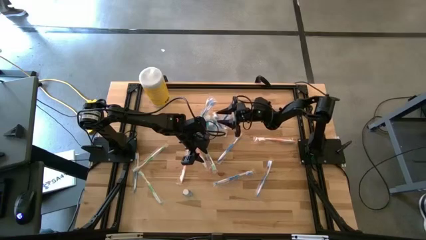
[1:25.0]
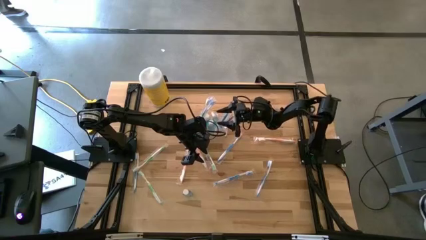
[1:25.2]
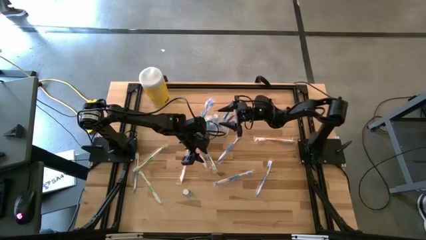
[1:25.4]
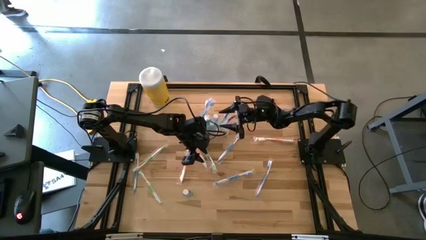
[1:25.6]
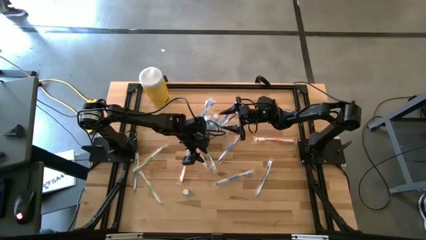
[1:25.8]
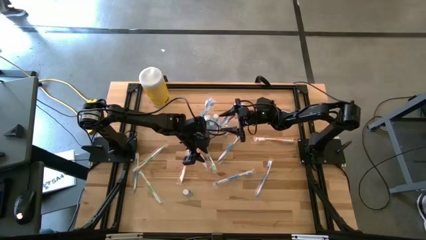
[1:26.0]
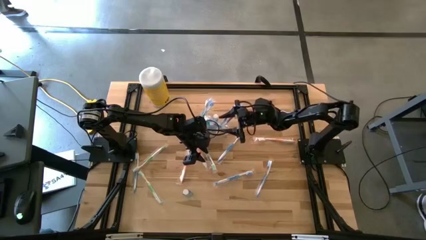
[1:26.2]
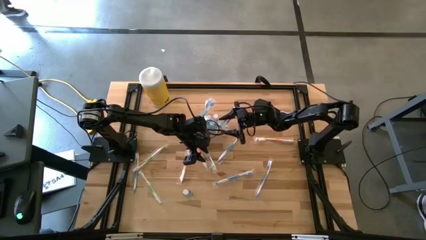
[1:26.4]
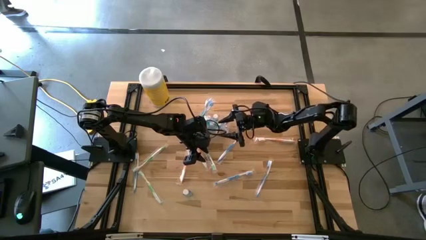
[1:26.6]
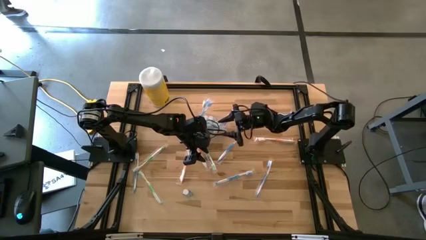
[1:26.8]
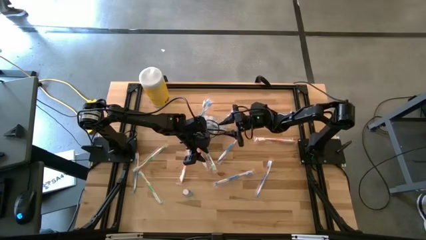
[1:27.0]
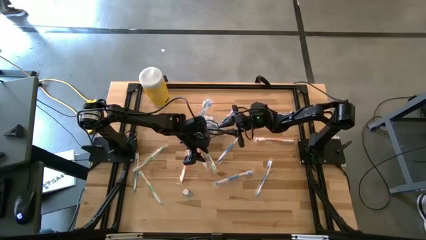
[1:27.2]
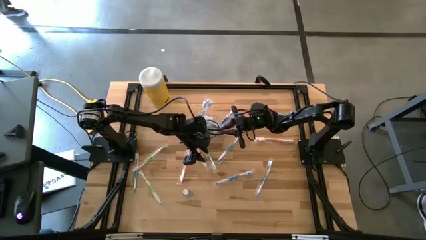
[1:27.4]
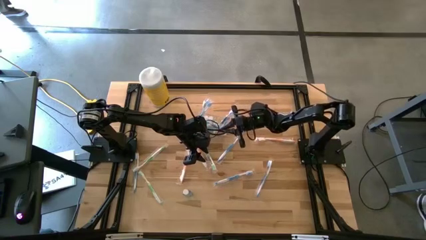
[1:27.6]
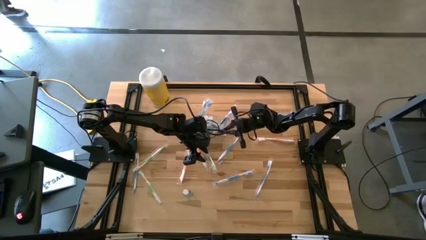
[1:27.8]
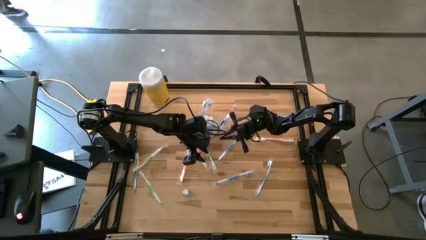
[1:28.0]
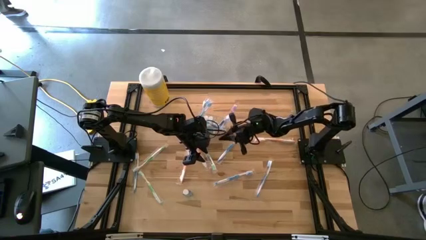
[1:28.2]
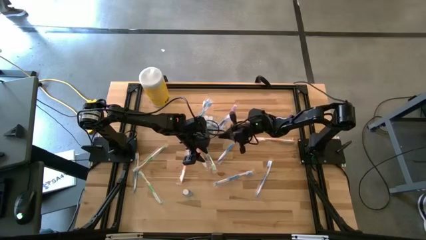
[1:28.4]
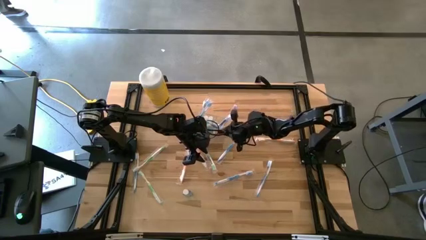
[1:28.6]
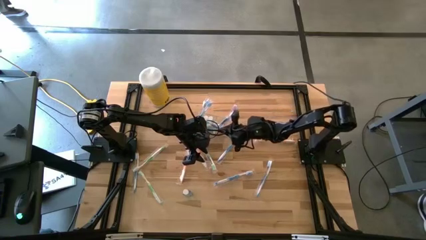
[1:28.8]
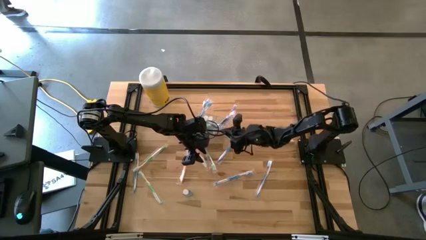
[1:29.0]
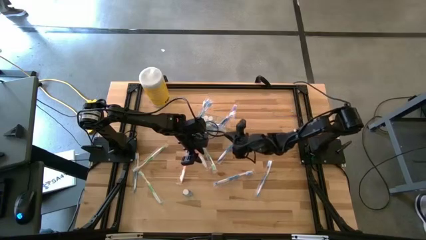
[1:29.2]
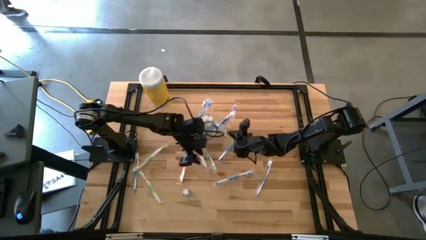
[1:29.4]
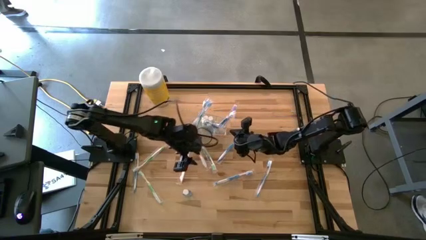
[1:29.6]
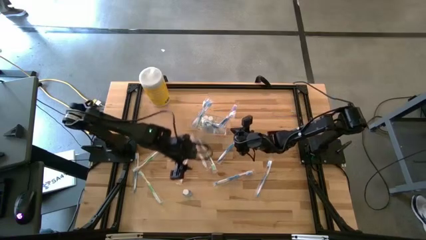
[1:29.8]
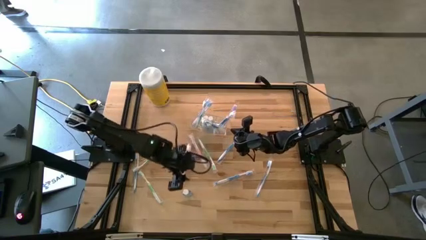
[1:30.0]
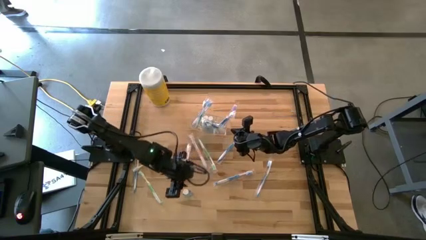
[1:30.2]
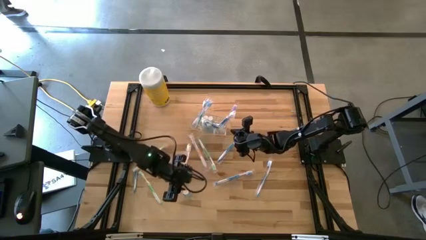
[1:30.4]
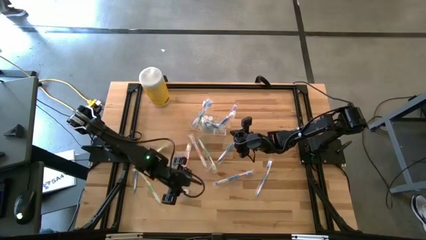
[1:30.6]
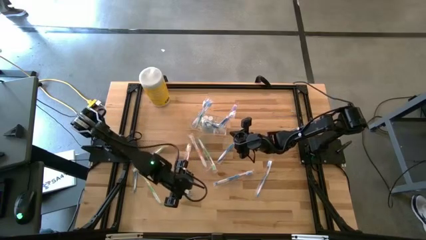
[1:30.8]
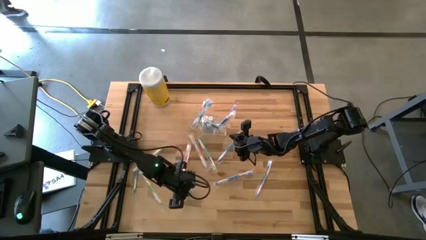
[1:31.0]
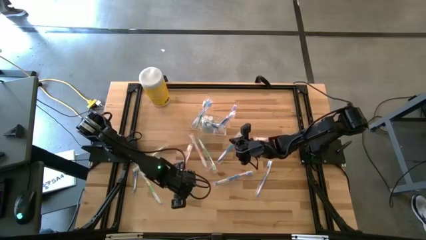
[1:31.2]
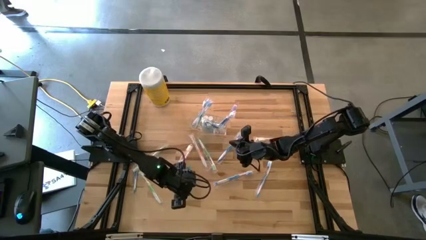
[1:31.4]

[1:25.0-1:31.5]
Task: Pick & Place toothbrushing station
Put the blue mouthwash into the transparent organizer

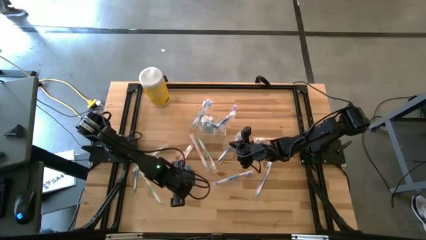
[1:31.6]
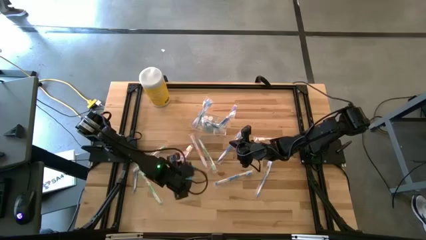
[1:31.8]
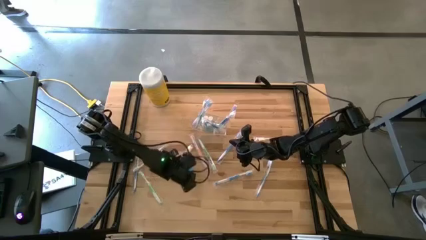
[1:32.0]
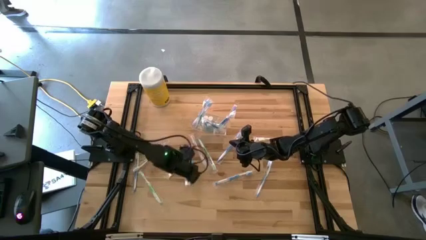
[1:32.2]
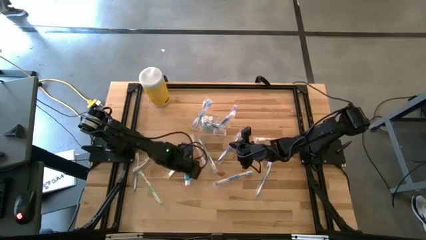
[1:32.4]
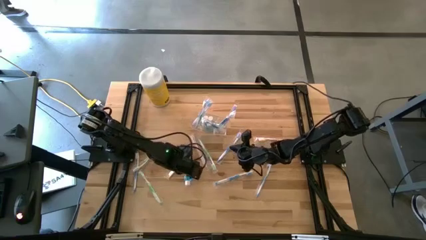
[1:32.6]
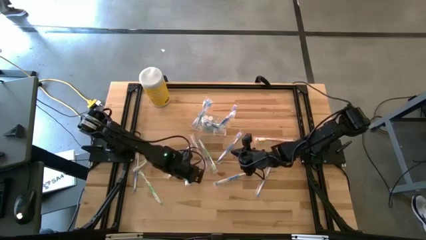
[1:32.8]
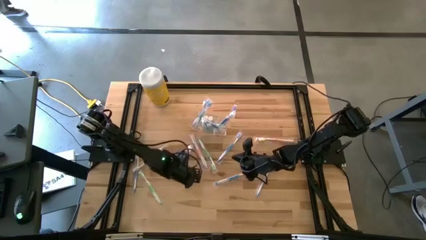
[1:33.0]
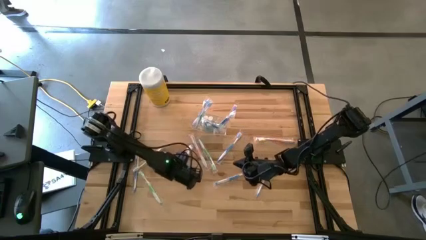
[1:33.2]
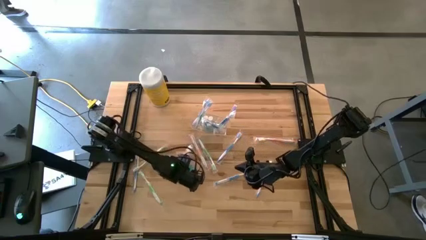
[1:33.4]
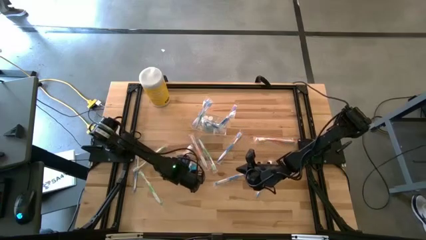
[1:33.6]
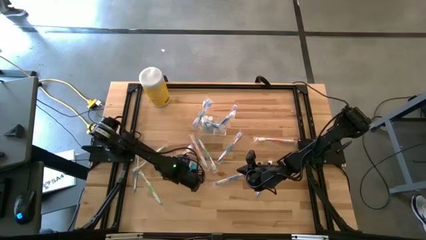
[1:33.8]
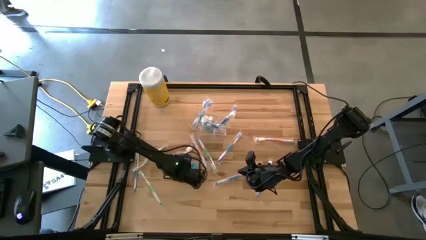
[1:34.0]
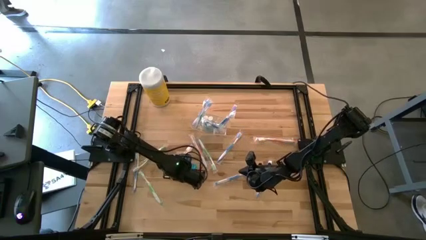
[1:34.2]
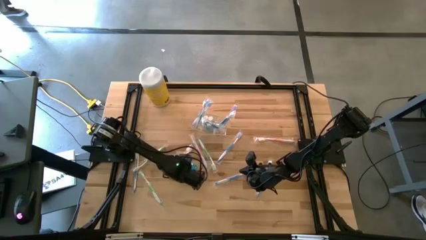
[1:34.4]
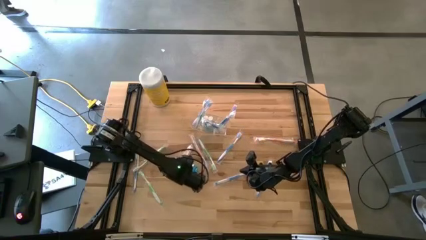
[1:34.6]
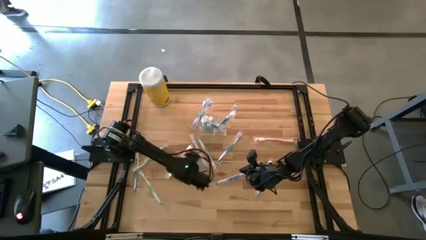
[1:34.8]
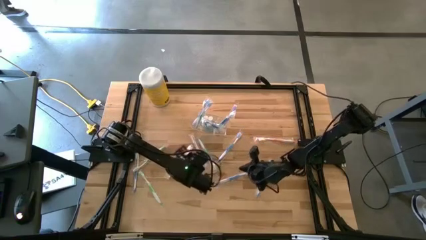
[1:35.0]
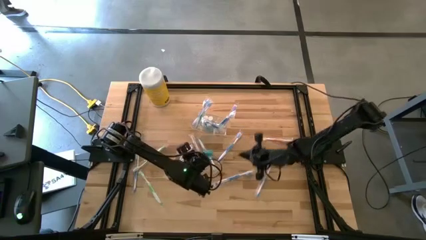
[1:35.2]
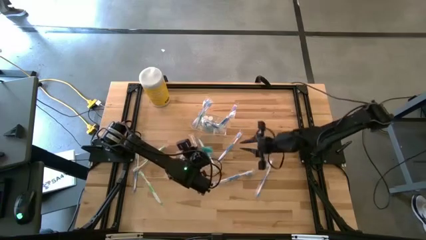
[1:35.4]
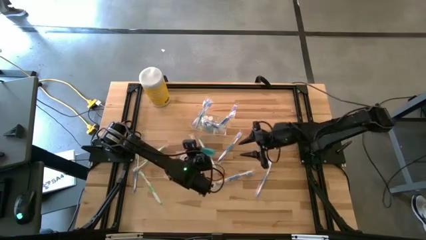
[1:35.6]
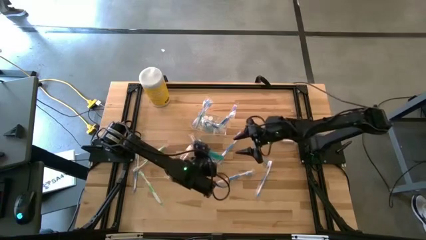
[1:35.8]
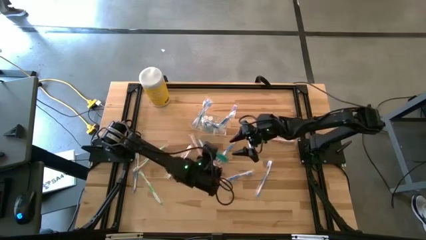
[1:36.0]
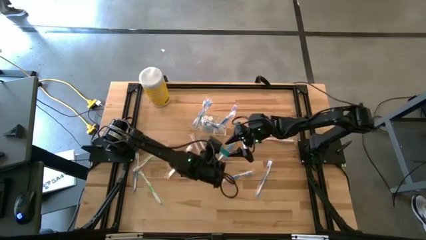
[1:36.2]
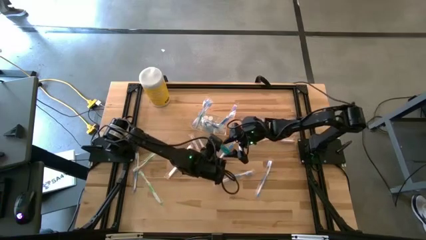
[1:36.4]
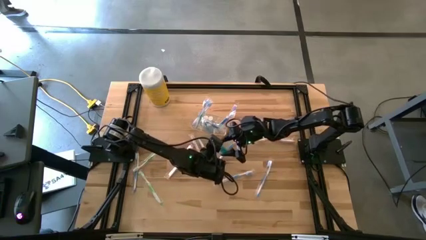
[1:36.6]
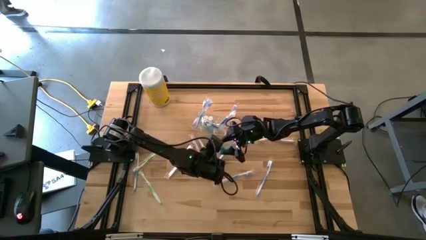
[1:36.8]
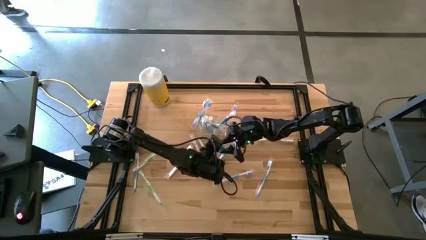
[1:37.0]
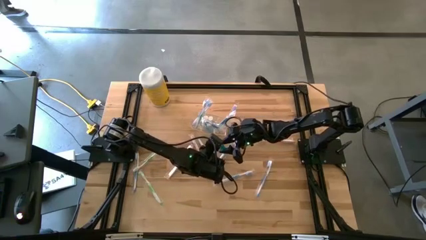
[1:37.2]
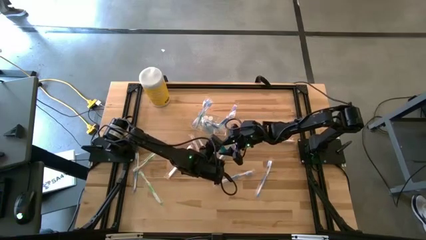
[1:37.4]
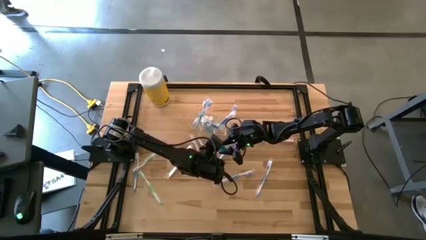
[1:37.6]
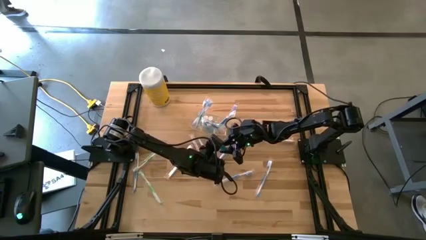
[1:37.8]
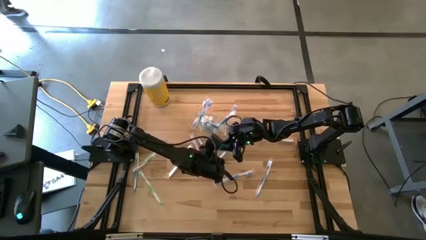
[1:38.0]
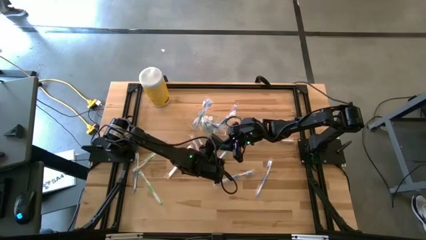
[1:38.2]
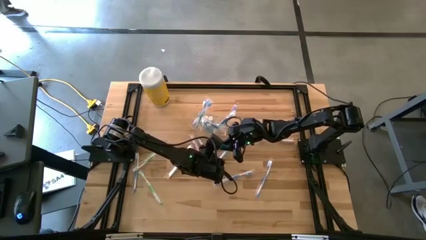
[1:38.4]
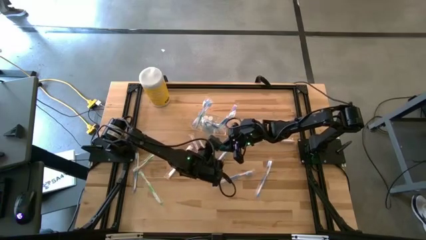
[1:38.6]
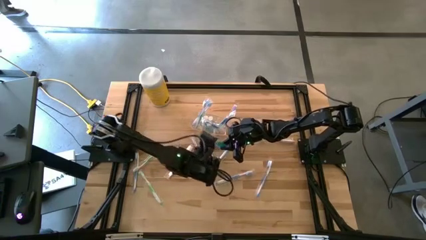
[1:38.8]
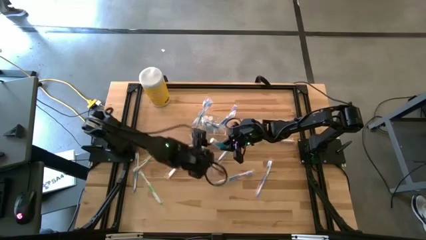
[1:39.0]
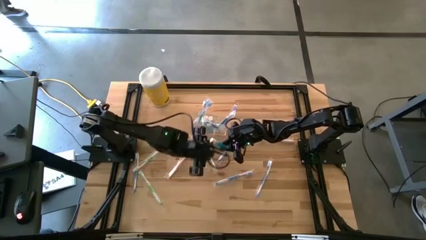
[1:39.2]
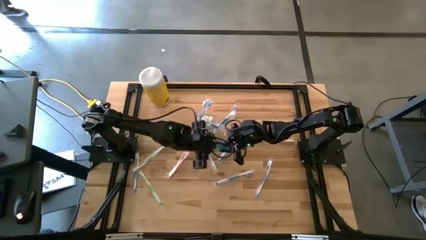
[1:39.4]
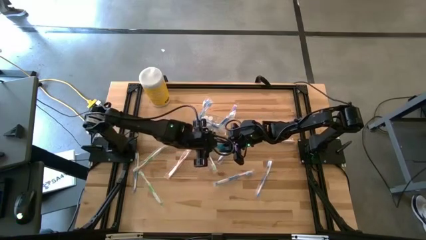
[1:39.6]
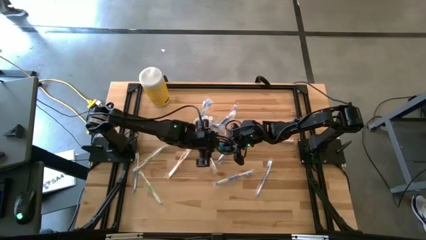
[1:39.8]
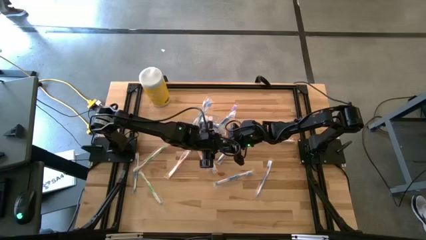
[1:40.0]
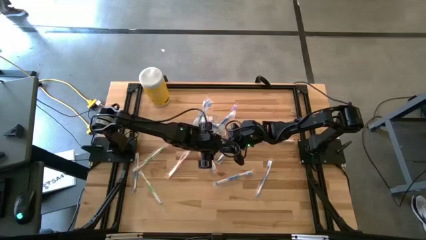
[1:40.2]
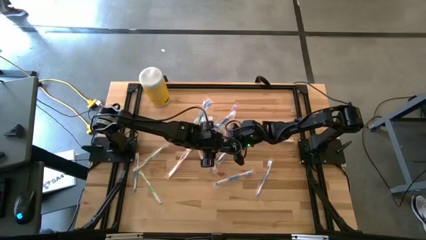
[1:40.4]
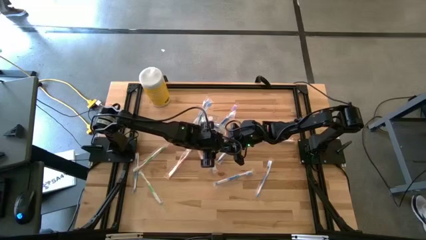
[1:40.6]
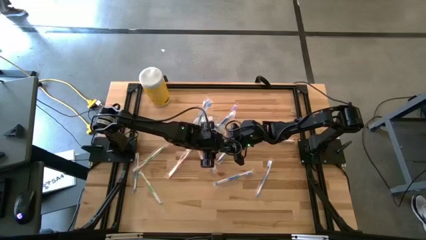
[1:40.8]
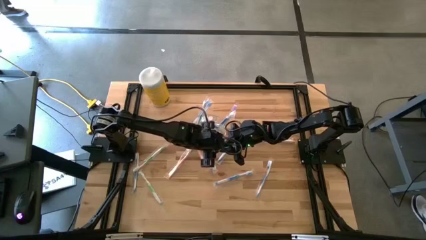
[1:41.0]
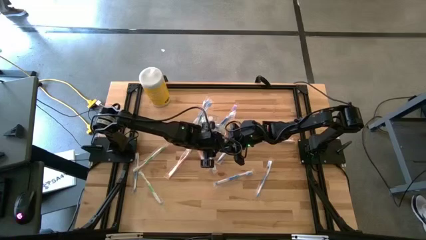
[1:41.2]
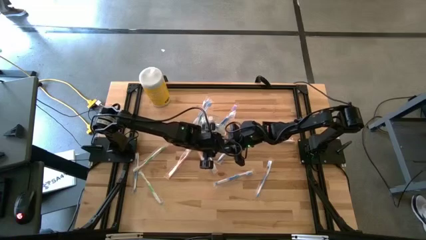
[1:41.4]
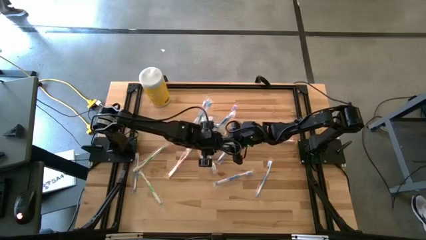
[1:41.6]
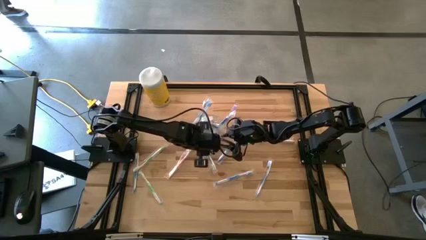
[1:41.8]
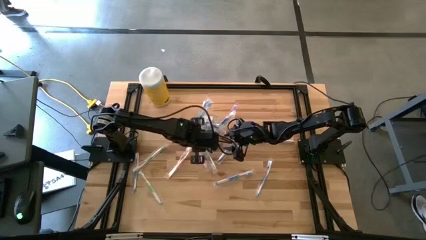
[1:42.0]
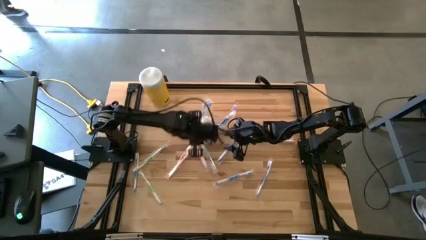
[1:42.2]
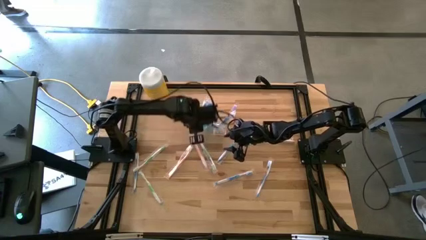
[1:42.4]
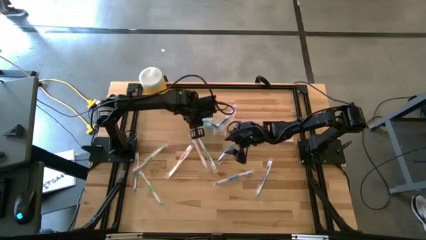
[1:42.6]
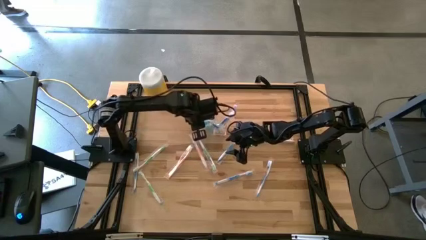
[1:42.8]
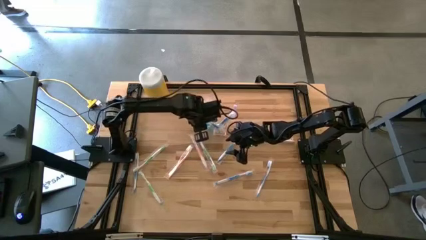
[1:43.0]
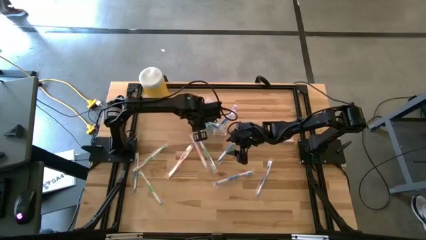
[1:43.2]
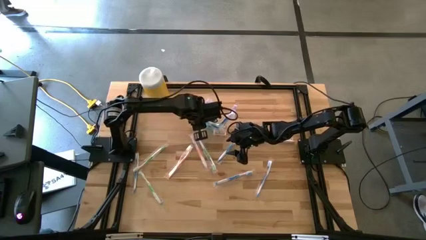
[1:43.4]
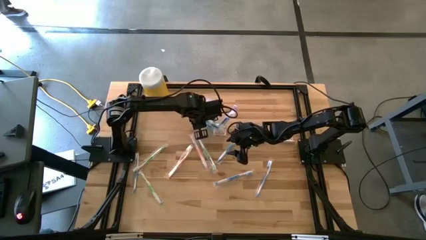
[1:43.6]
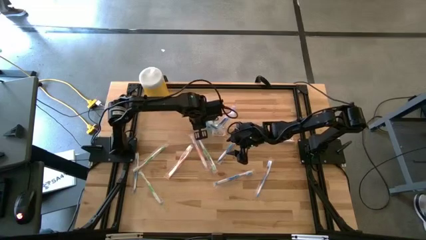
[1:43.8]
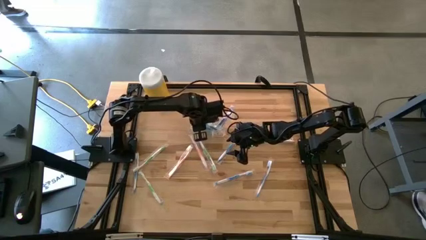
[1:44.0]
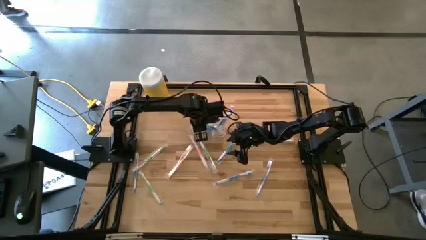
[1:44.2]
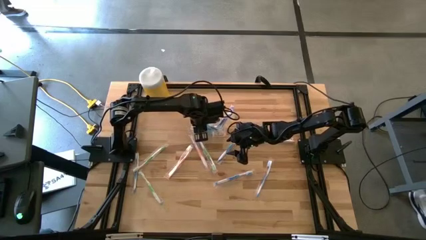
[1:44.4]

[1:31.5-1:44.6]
Put the blue mouthwash into the transparent organizer
